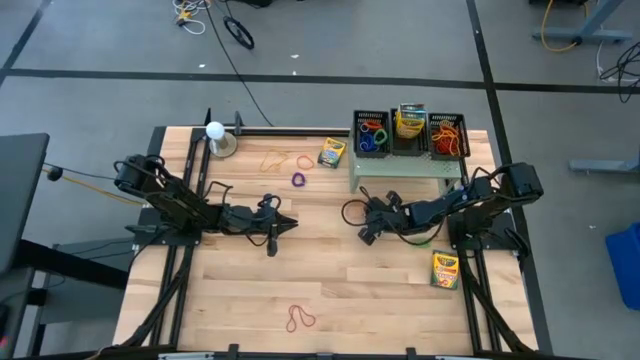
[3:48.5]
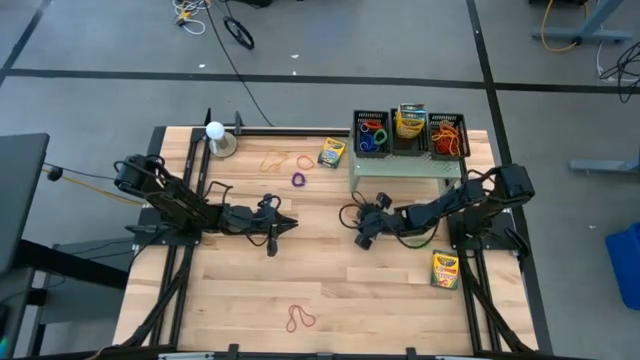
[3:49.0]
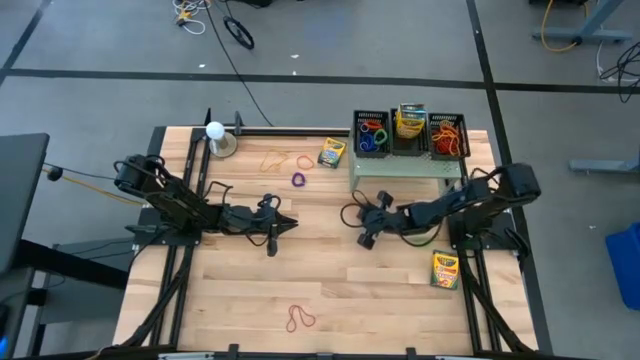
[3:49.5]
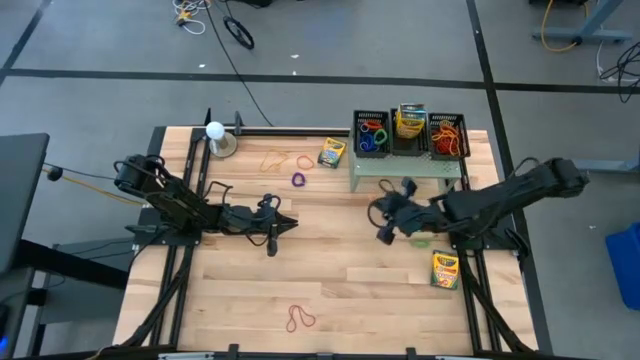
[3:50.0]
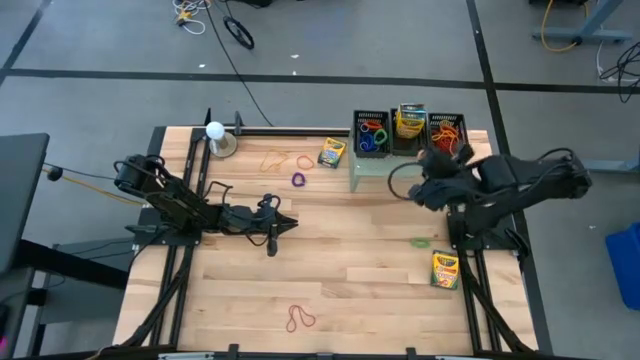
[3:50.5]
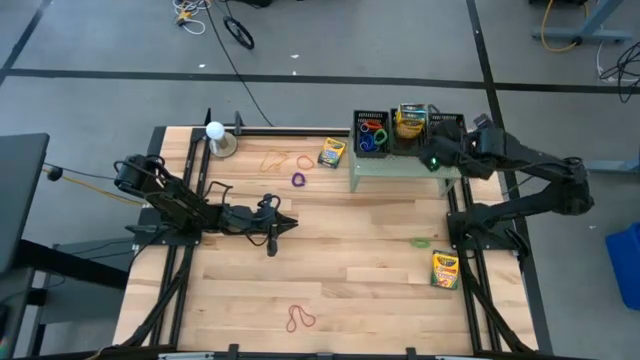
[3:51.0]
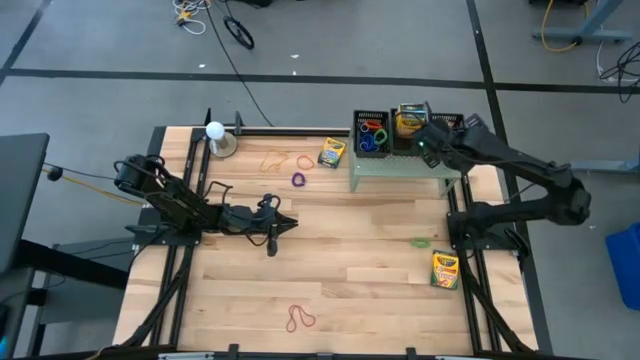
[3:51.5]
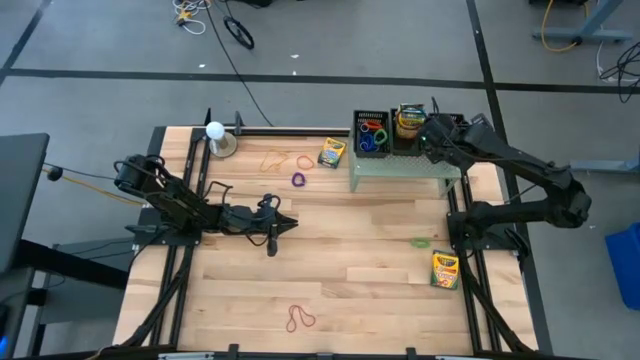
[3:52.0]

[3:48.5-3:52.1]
Task: Pick & Place Office Desk Supplies
Put the right orange rubber band into the right black basket on the shelf

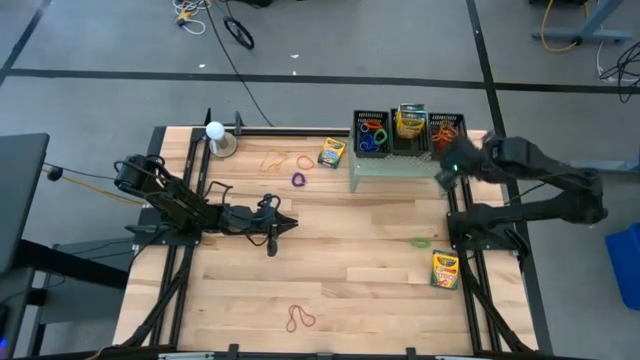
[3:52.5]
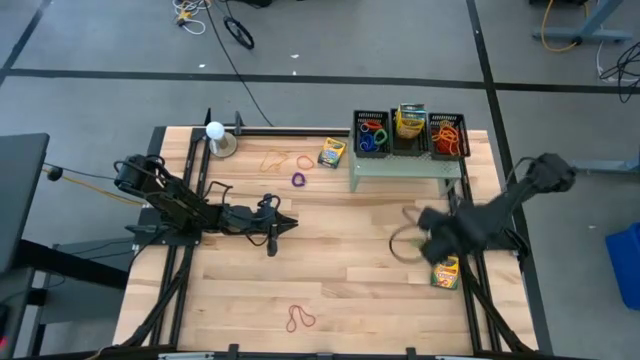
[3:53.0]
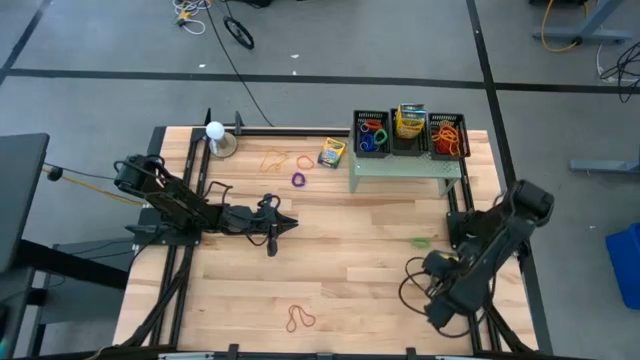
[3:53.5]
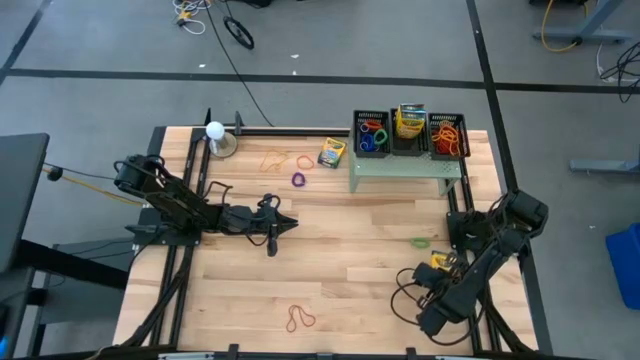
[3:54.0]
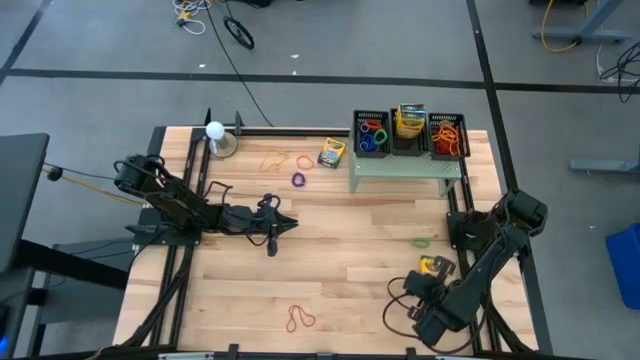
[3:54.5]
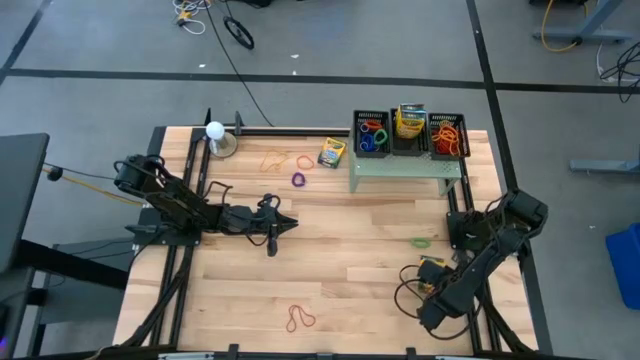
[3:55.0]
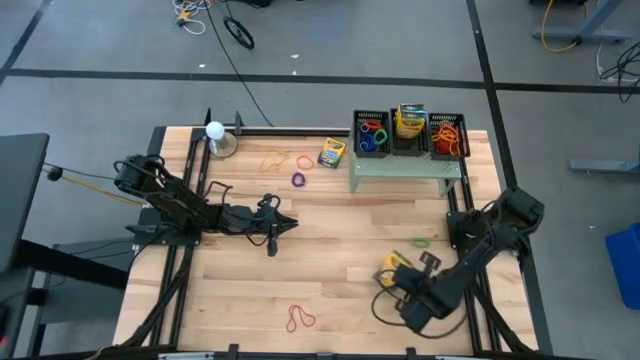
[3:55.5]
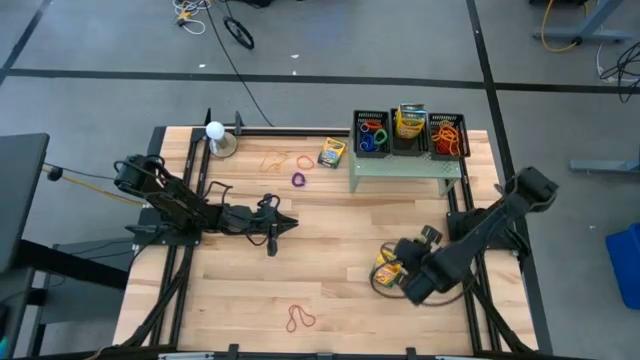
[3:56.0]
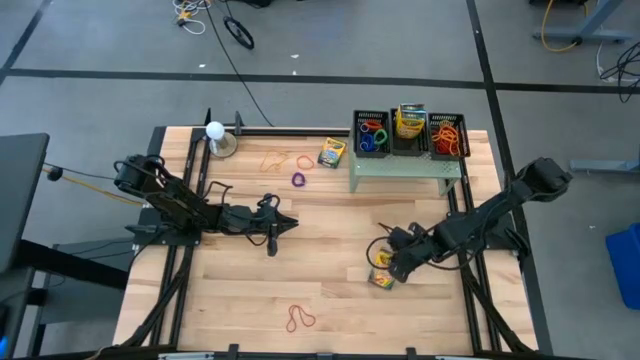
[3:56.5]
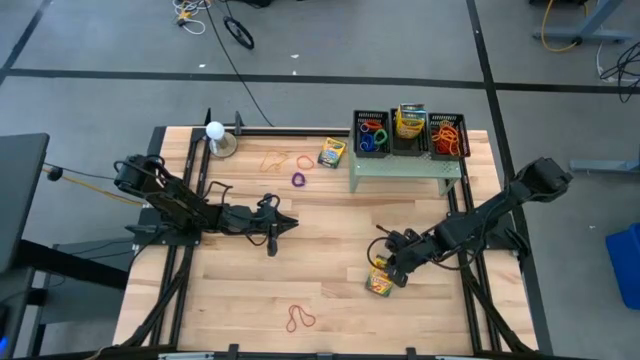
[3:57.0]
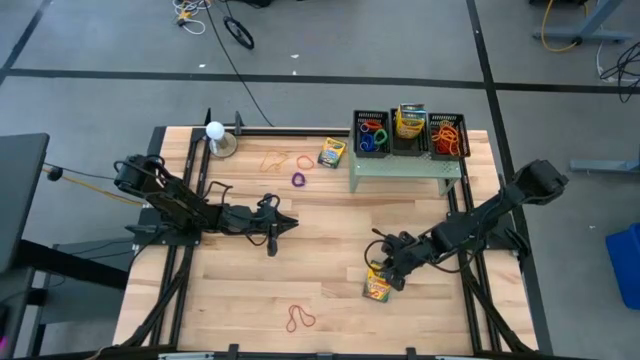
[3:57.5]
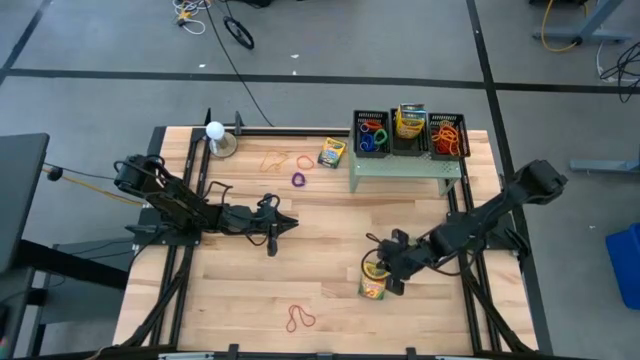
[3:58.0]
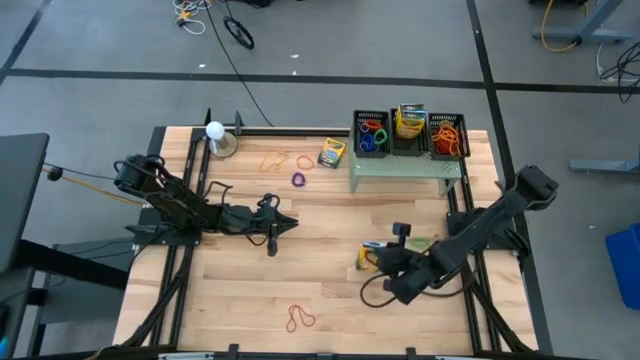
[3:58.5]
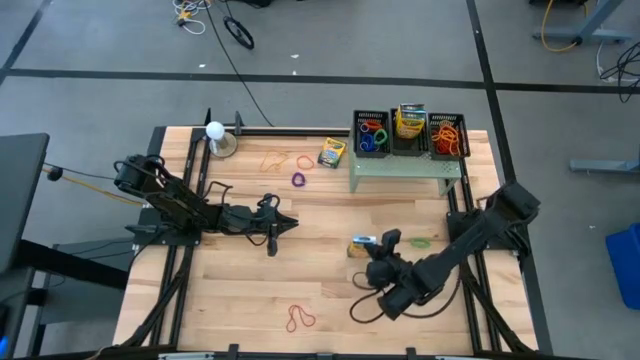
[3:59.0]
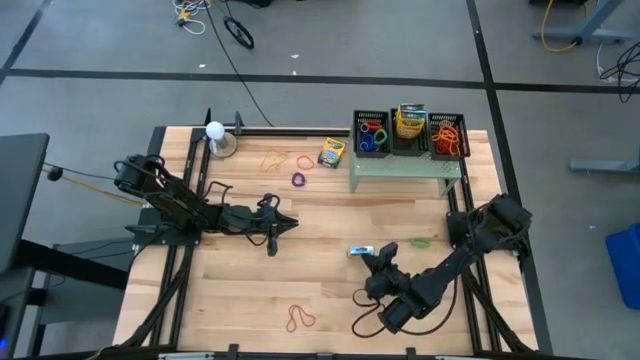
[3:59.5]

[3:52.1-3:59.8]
Put the bottom yellow crayon box into the middle black basket on the shelf

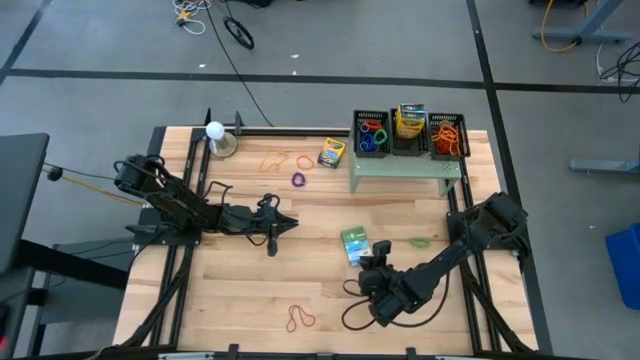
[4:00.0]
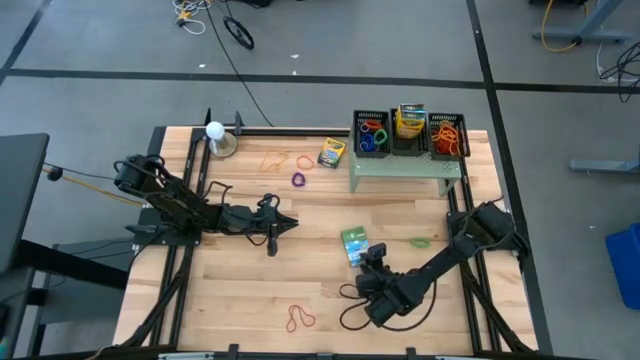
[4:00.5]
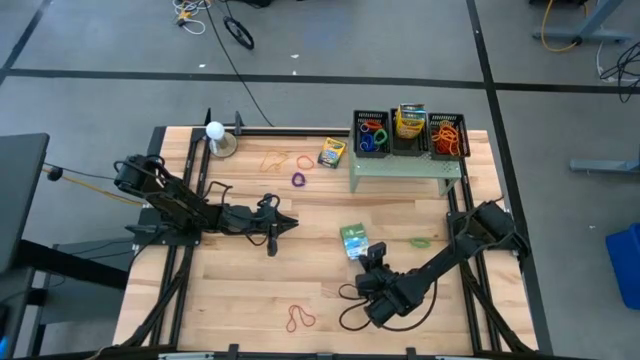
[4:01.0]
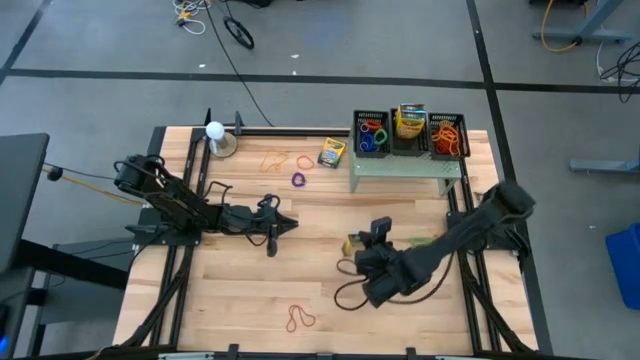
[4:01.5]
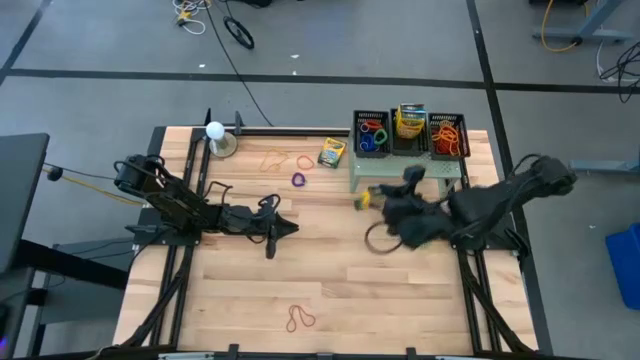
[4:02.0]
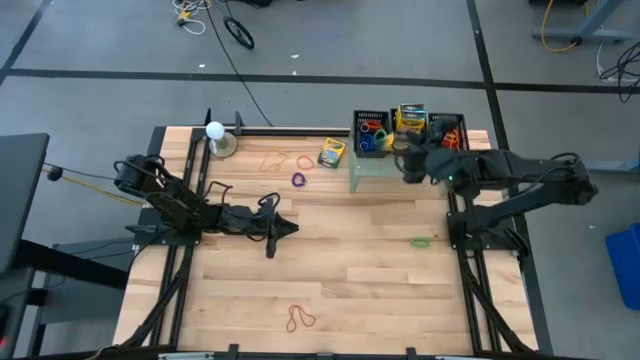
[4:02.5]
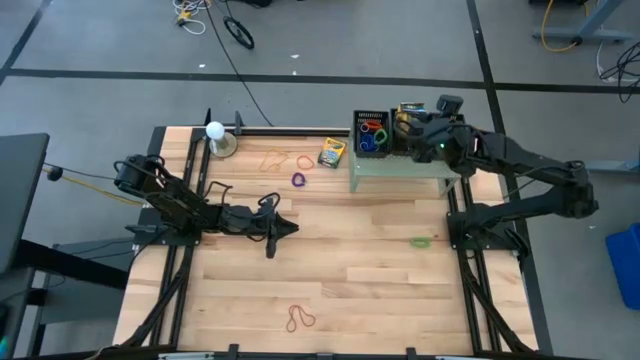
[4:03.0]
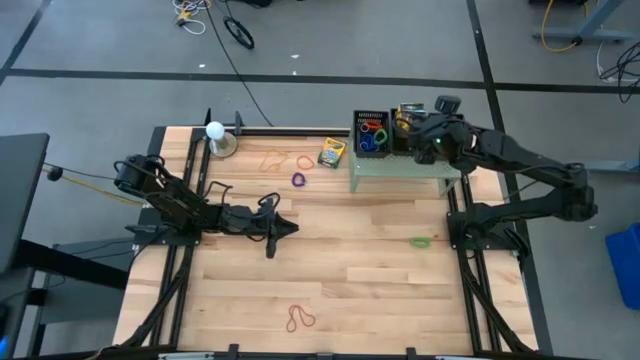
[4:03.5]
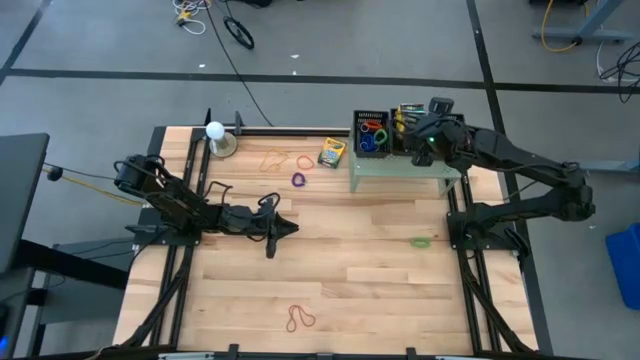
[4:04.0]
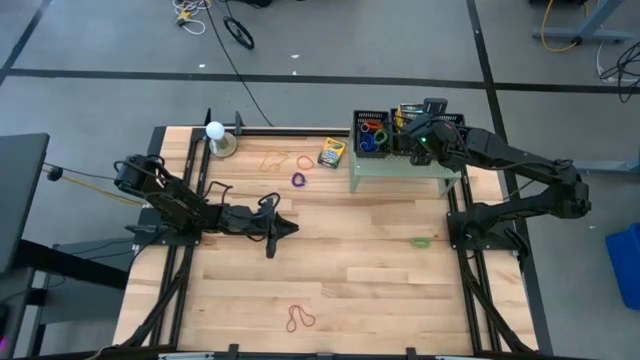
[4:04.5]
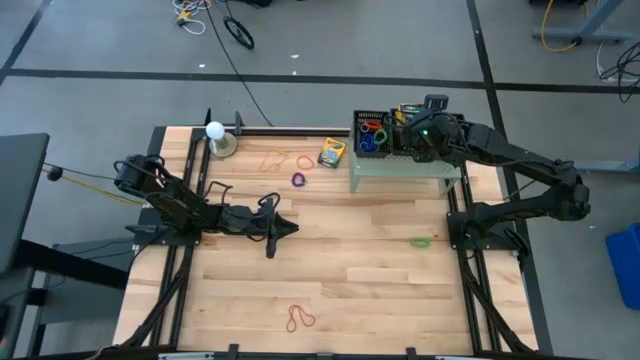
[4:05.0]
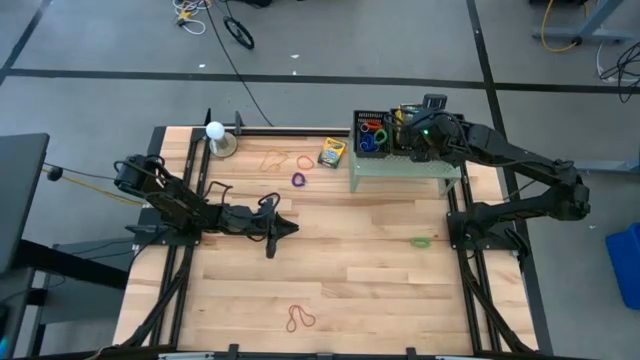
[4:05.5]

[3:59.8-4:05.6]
Put the bottom yellow crayon box into the middle black basket on the shelf

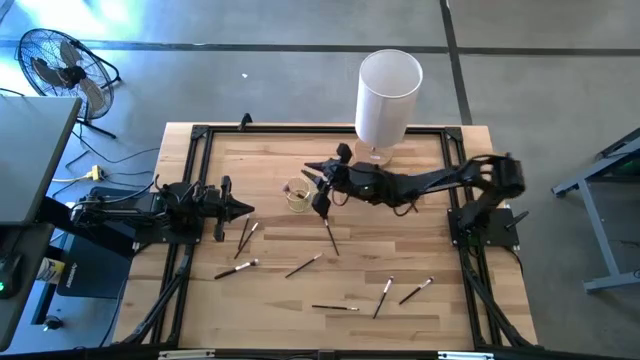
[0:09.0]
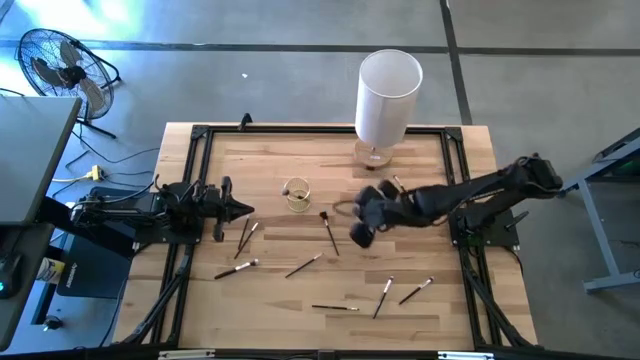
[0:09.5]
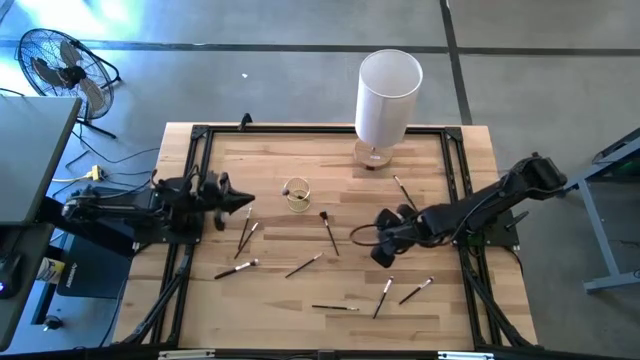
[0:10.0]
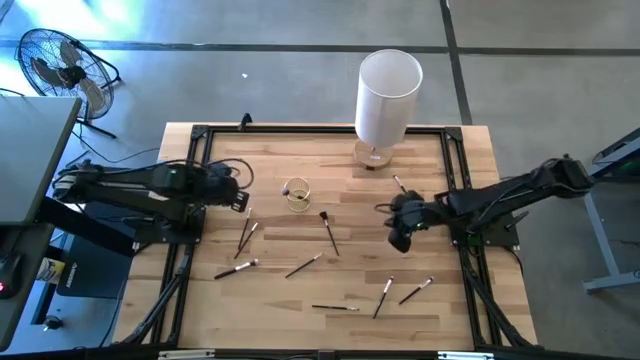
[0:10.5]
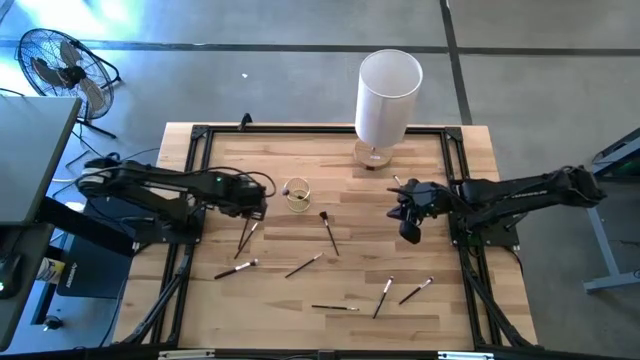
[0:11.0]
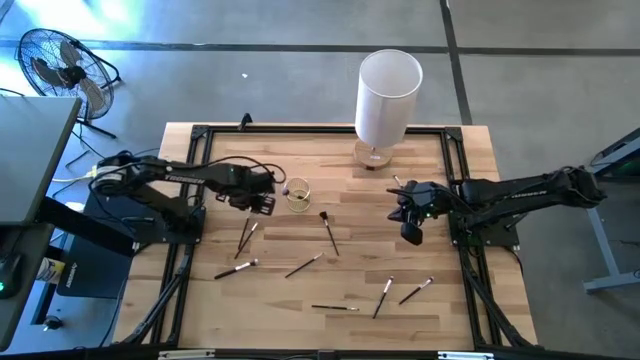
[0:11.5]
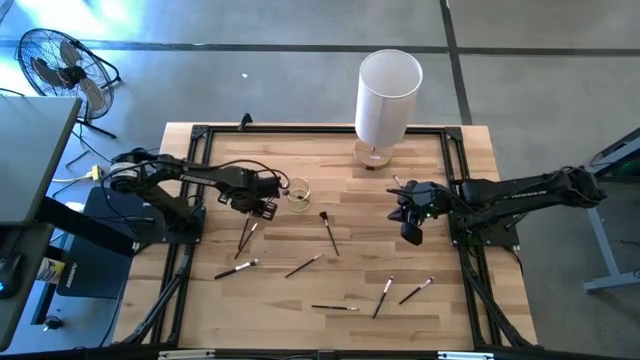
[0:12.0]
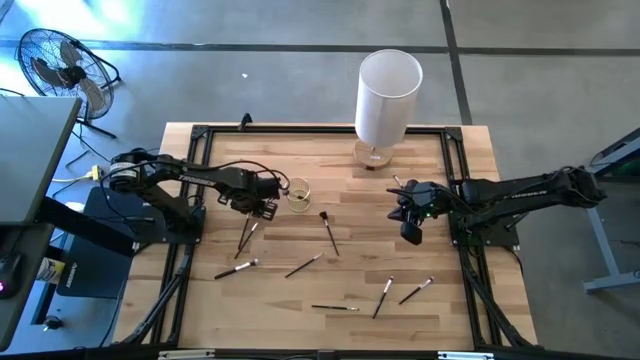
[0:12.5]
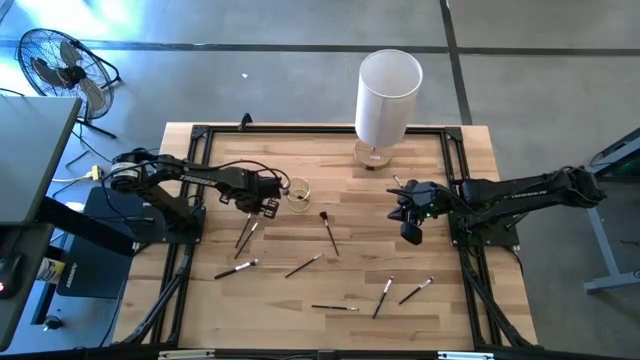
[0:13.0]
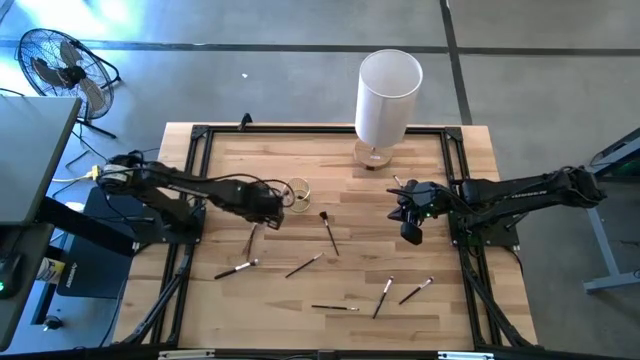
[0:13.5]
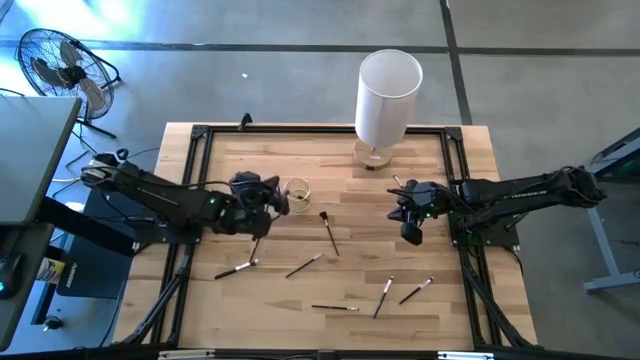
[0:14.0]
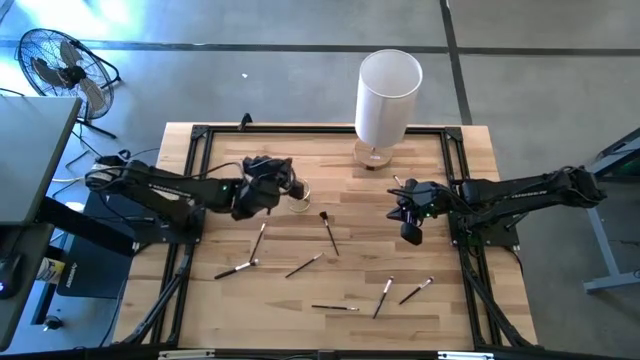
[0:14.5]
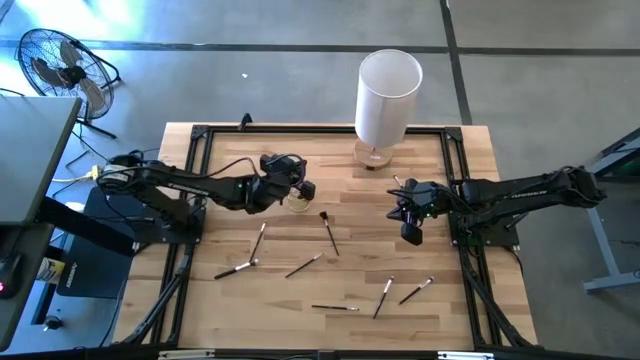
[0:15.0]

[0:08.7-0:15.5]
Task: Put items in baskets/containers
Put the black eyeshadow brush into the yellow holder
